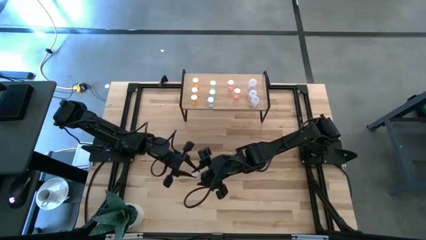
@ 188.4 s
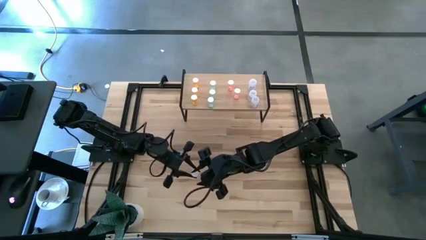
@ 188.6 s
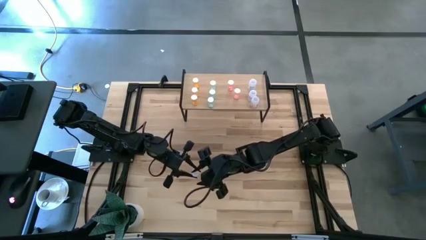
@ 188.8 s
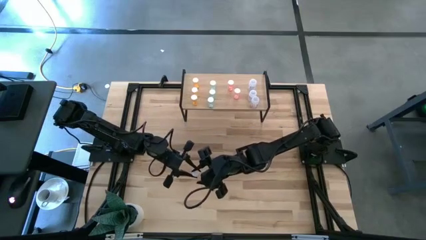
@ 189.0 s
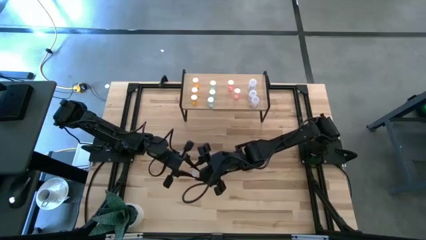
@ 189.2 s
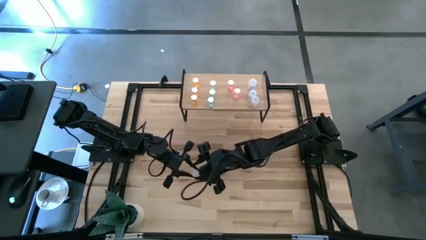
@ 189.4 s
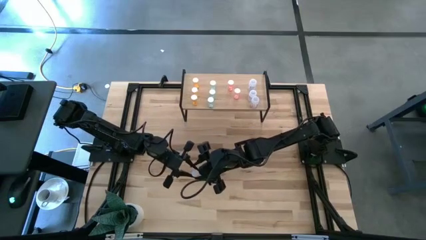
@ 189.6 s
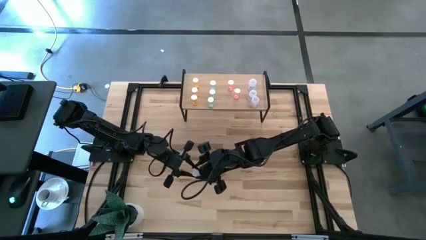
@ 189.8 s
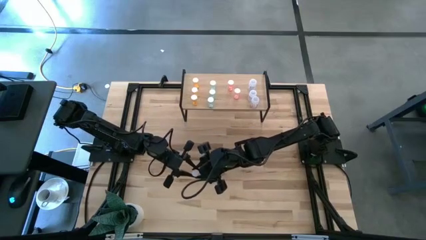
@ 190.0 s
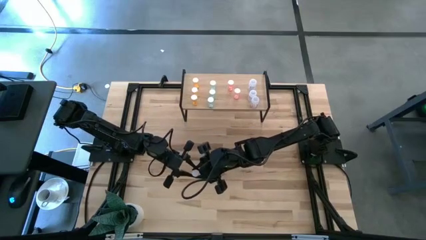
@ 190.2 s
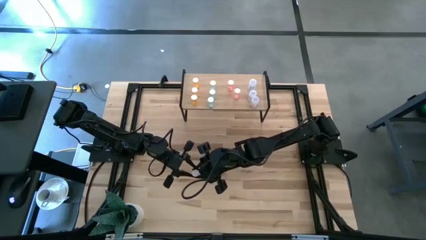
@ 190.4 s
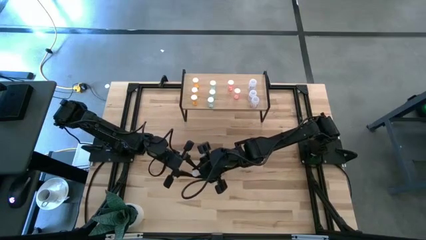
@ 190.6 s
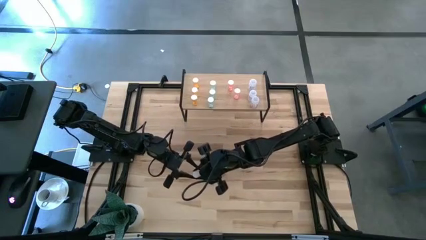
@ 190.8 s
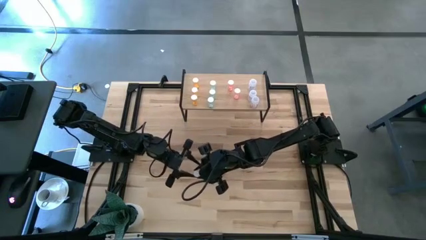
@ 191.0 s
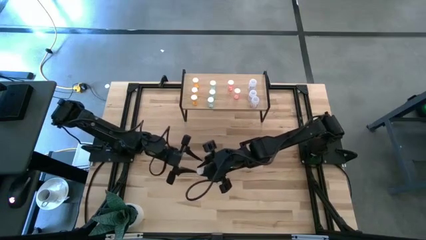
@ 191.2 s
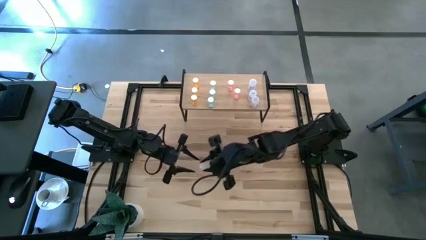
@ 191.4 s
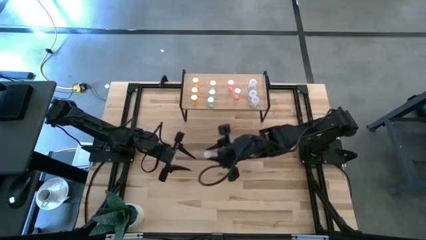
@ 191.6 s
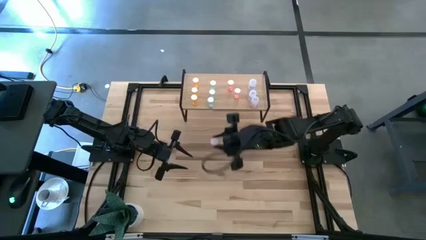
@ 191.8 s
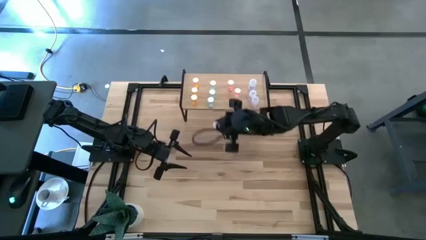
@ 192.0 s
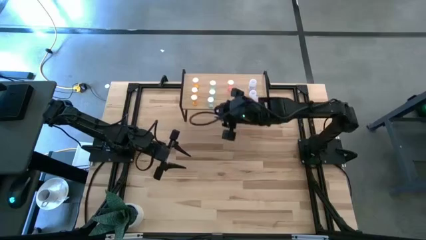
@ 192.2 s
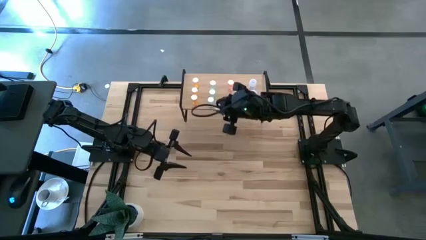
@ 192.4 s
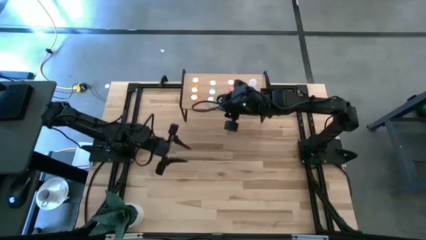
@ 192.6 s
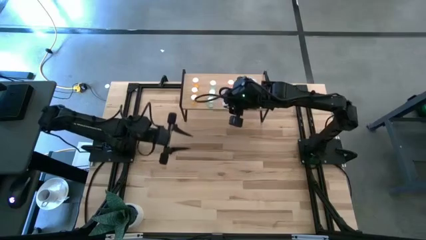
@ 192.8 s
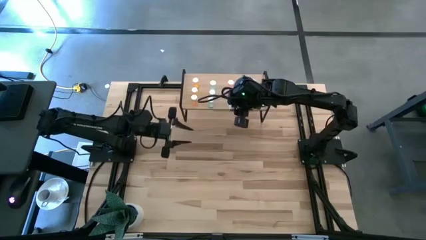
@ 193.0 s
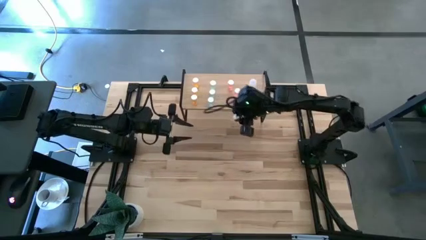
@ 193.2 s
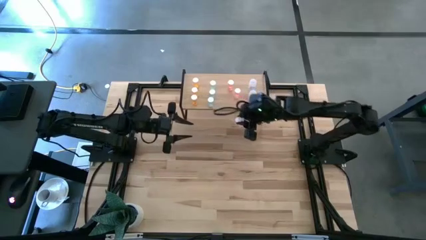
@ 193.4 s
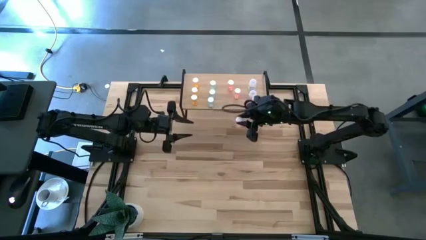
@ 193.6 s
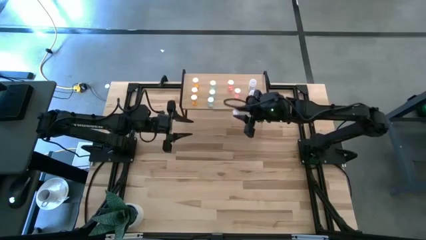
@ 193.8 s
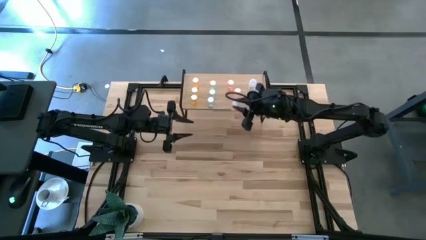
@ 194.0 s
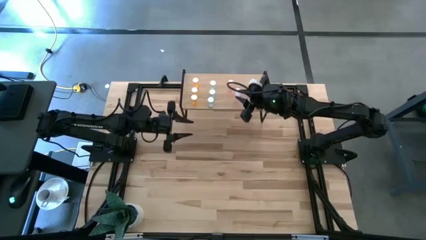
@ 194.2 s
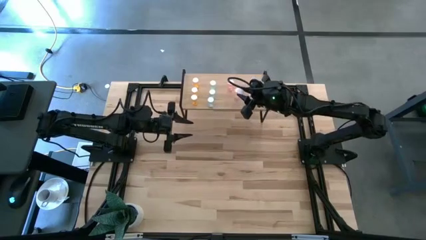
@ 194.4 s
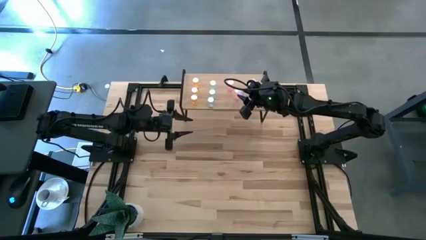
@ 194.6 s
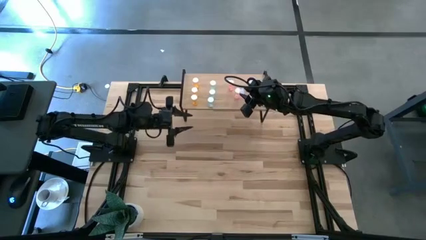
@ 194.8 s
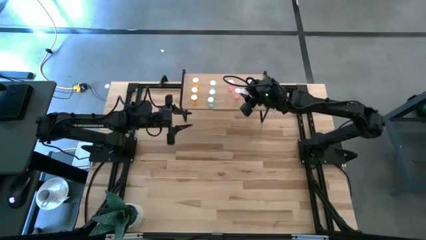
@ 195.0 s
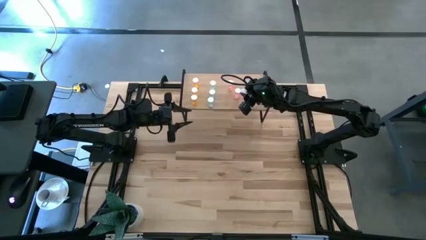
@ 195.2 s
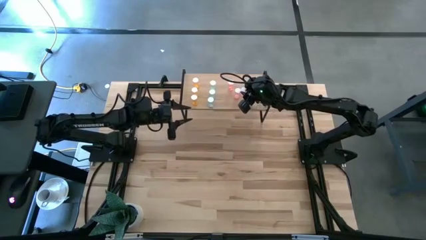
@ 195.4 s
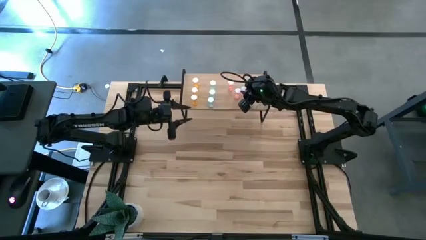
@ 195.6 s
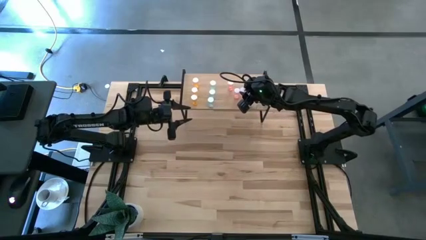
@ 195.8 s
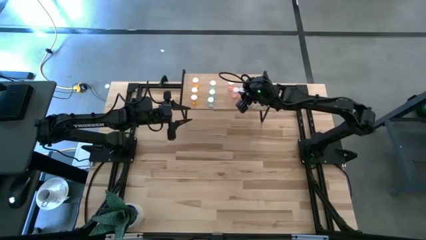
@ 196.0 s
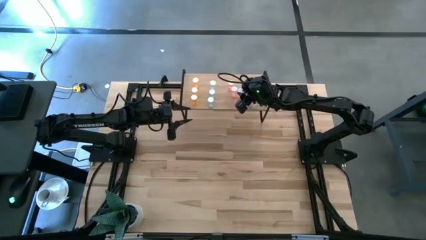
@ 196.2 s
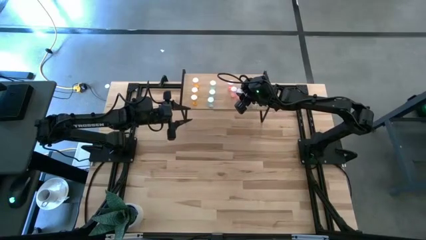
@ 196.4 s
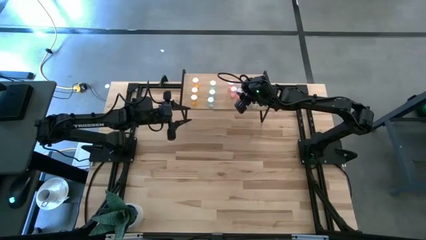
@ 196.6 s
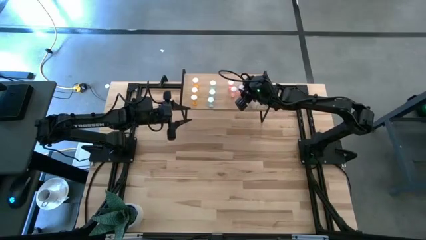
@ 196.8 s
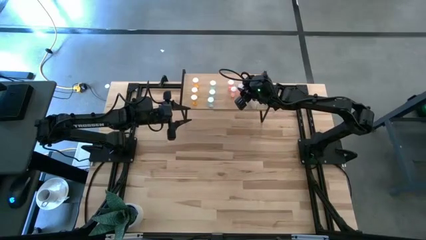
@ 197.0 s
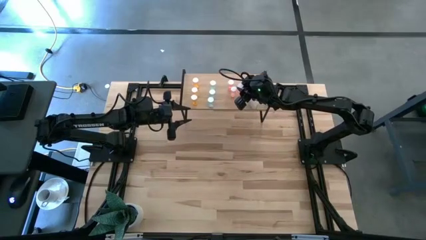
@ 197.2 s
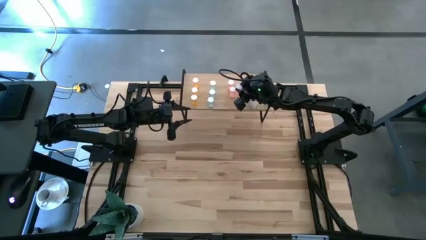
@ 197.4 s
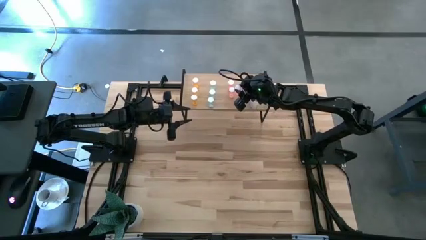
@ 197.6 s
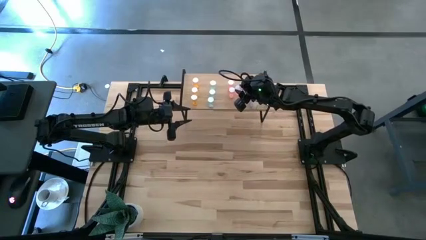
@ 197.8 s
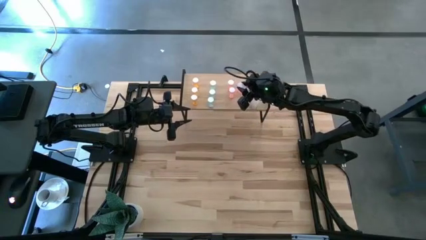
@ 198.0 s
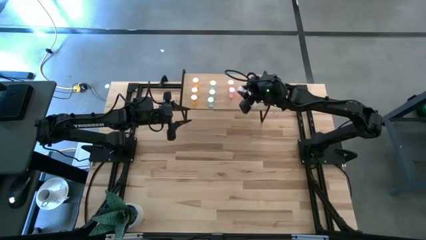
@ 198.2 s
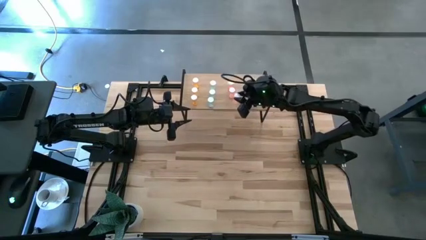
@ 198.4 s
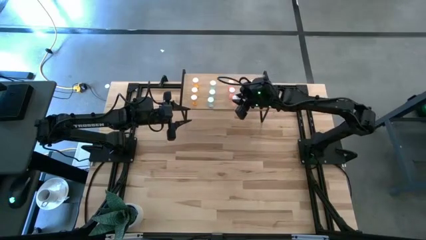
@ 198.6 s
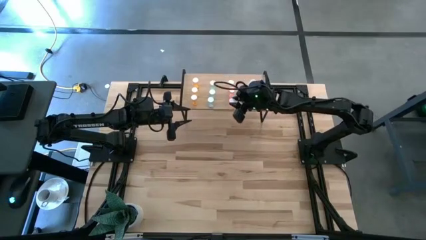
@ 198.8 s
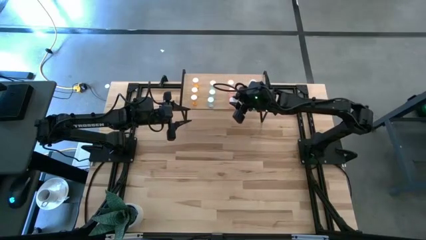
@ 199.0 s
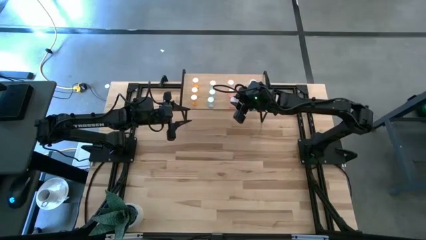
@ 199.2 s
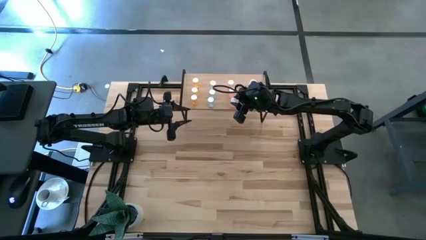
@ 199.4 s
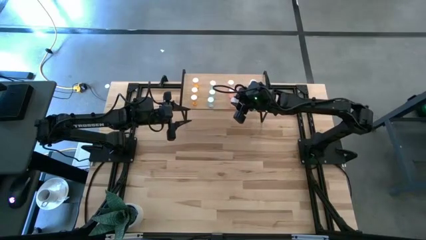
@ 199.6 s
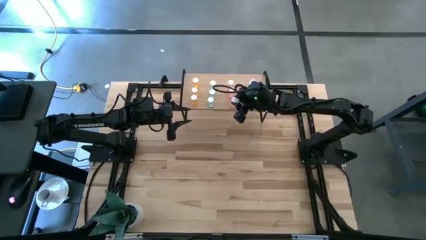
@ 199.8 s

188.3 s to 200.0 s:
Task: Pick and place medicine bottles onto shelf by color
Put the pink pill bottle on the shelf aligned with the pink pill bottles

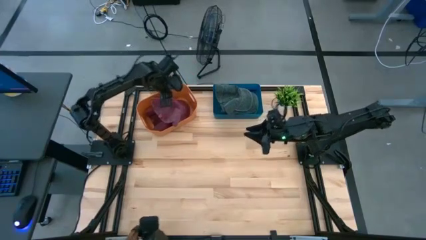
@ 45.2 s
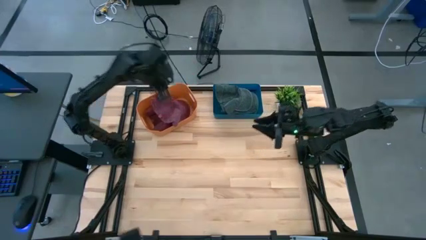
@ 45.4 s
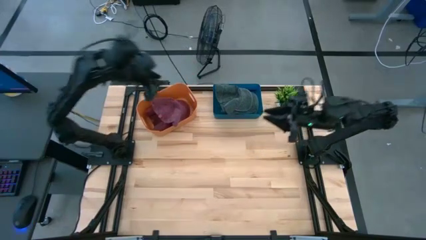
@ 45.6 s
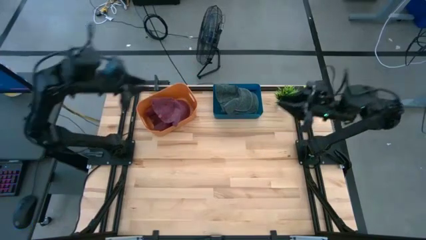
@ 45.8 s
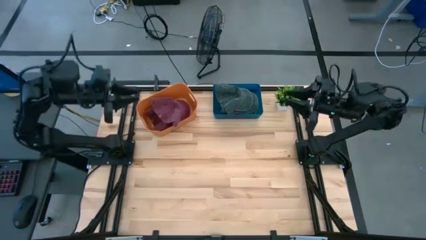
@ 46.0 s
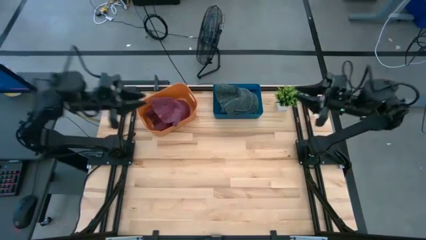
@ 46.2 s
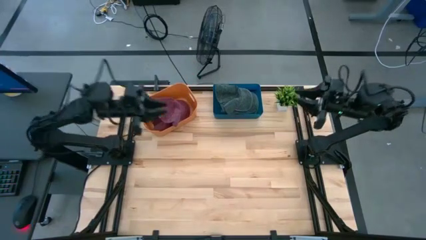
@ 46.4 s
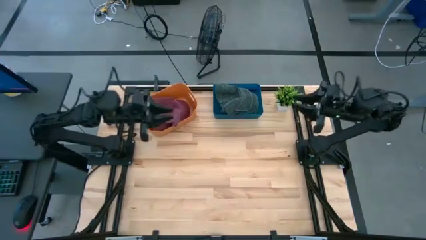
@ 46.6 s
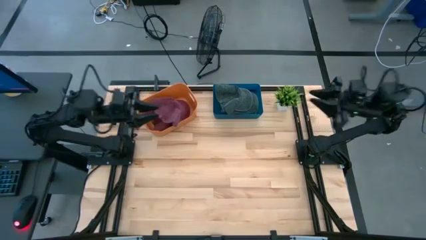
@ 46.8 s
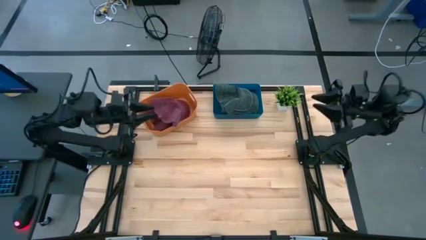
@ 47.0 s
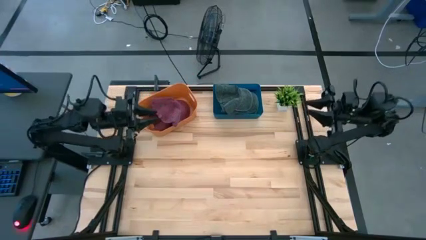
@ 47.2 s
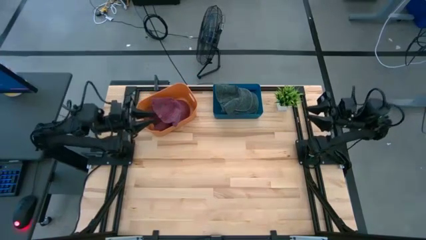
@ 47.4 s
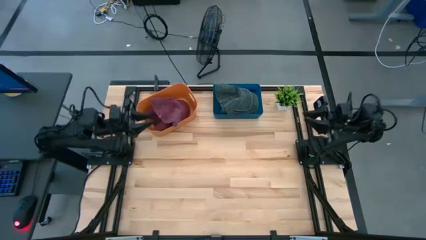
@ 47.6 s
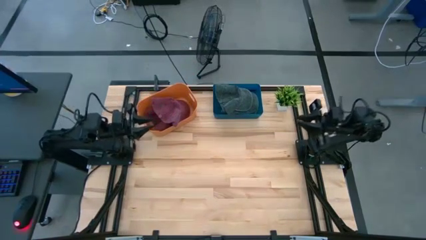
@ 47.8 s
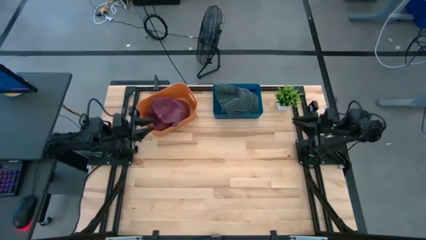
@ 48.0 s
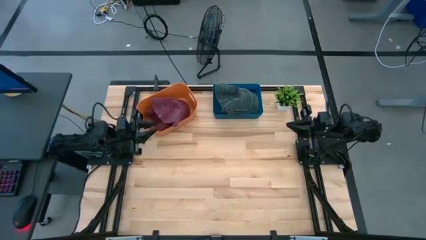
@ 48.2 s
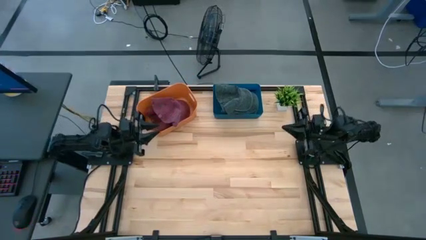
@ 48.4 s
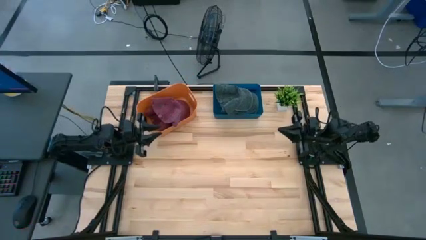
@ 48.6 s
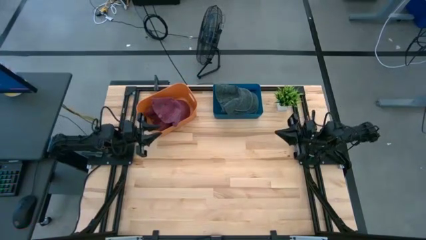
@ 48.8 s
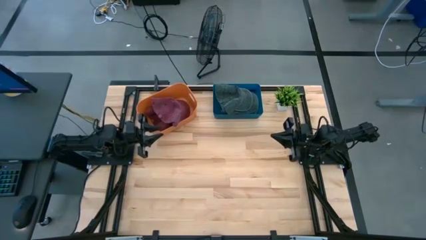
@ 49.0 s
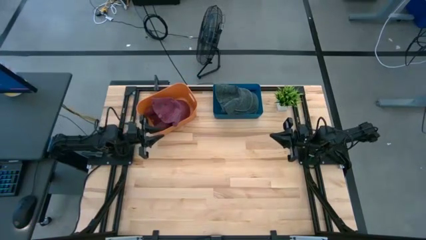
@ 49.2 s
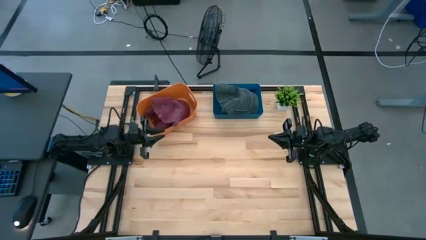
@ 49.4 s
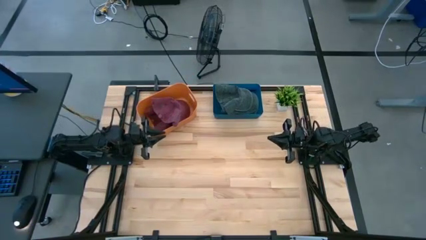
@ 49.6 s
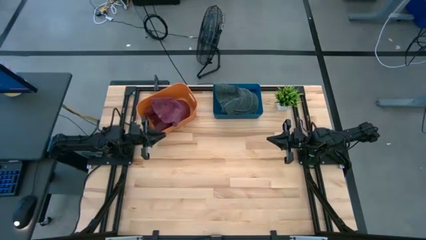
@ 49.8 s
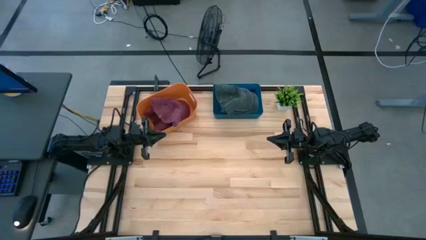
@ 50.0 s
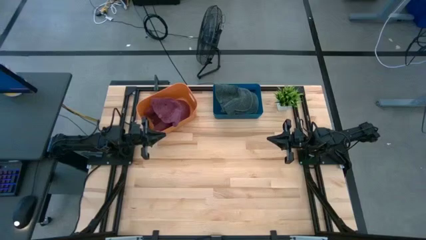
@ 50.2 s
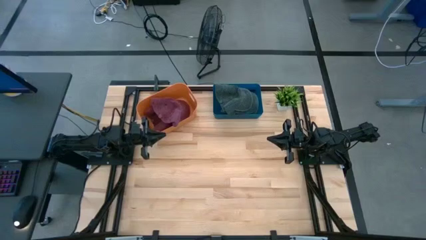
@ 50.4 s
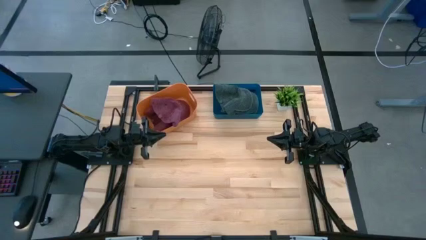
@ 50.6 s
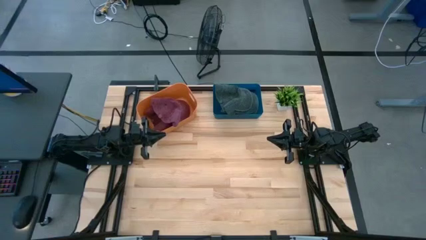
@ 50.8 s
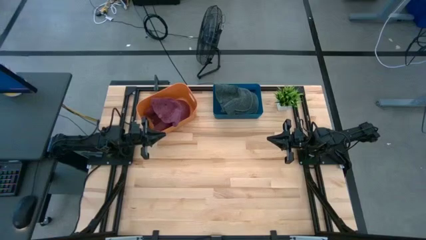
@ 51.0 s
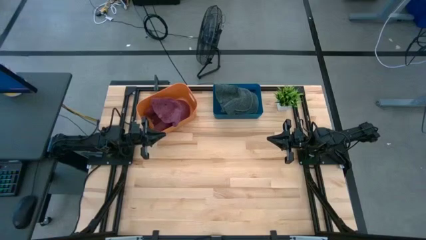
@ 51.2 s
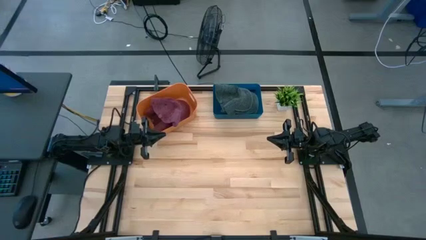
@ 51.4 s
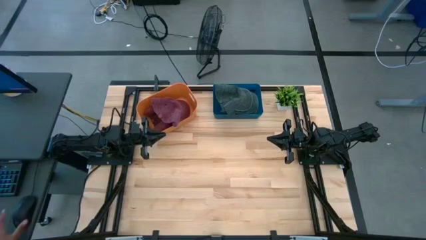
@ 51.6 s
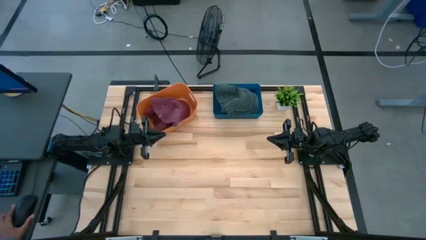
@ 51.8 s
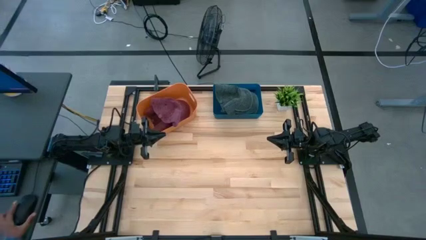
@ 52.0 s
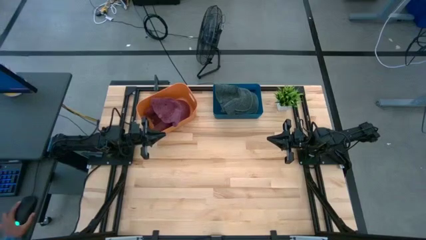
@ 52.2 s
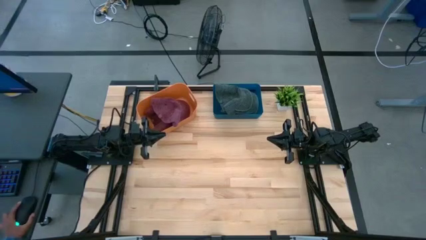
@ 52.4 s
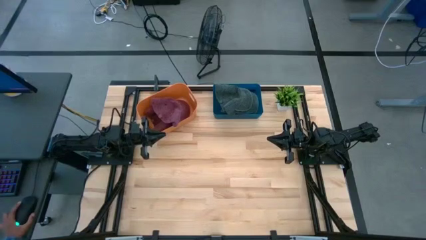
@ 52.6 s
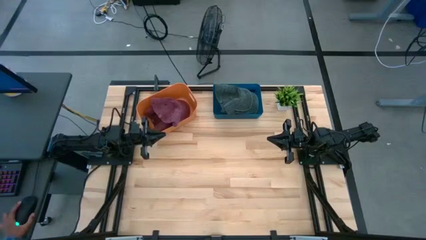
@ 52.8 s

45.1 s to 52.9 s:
Task: Pick & Place hat
Return to Home Position
